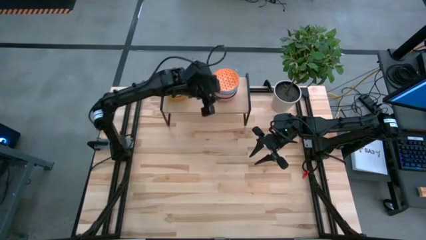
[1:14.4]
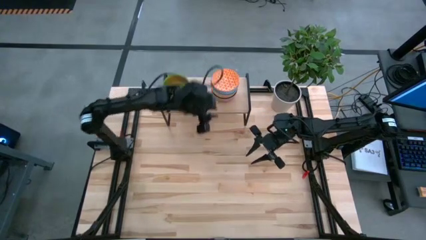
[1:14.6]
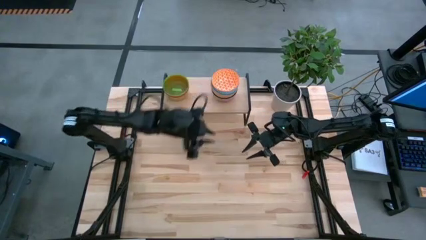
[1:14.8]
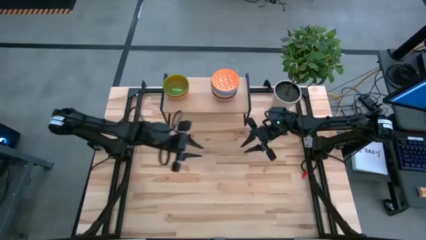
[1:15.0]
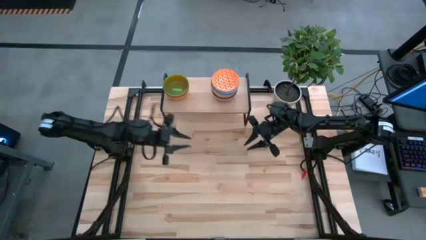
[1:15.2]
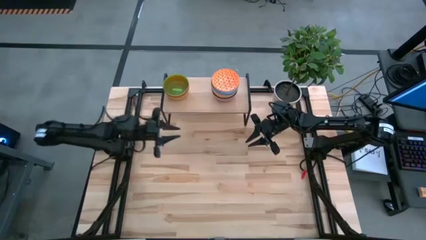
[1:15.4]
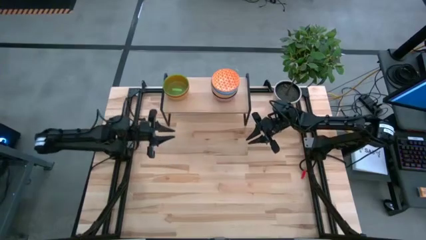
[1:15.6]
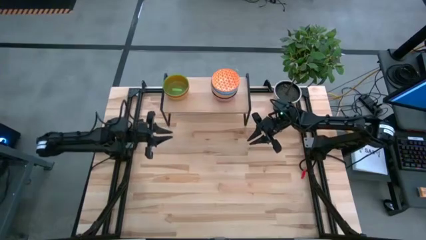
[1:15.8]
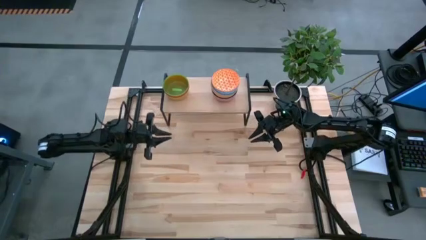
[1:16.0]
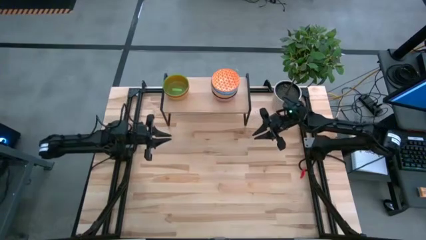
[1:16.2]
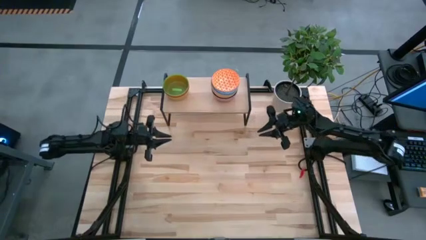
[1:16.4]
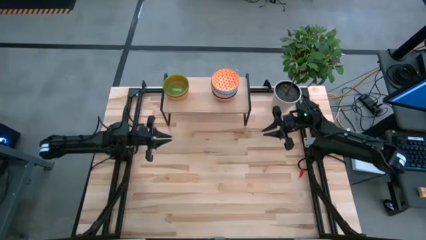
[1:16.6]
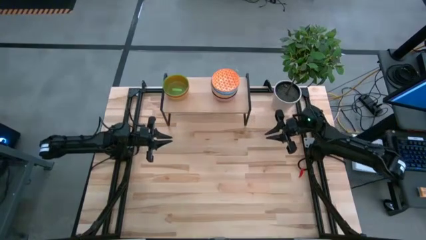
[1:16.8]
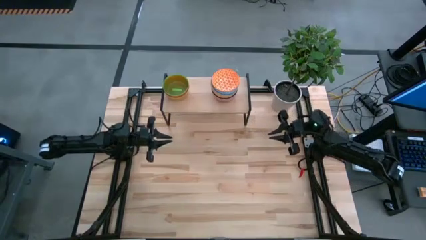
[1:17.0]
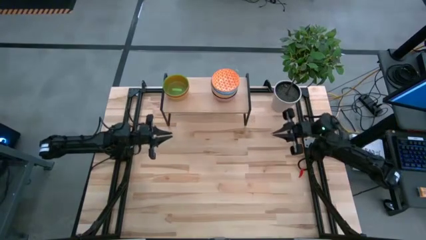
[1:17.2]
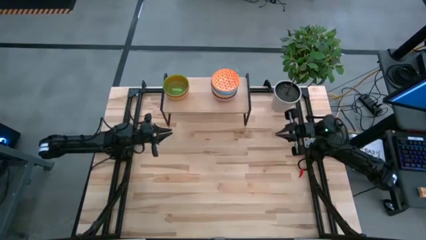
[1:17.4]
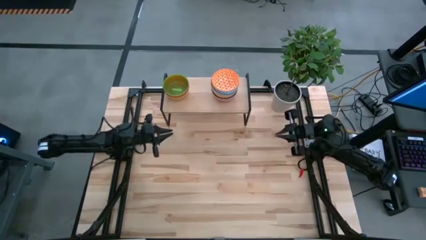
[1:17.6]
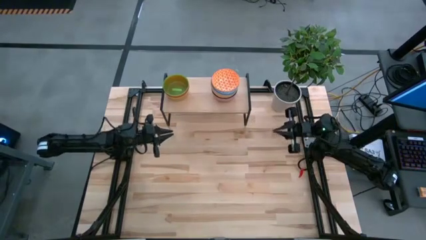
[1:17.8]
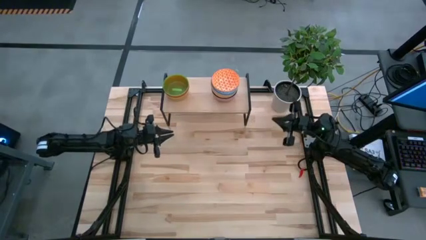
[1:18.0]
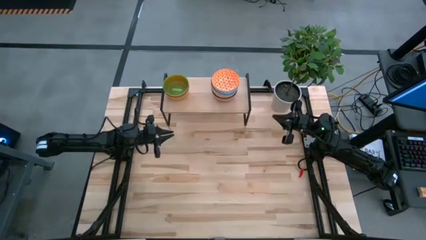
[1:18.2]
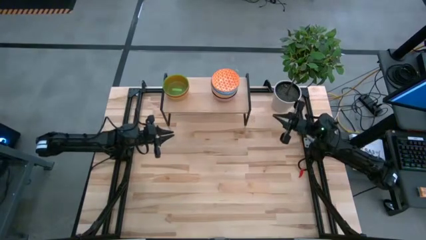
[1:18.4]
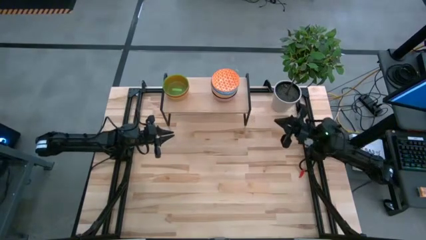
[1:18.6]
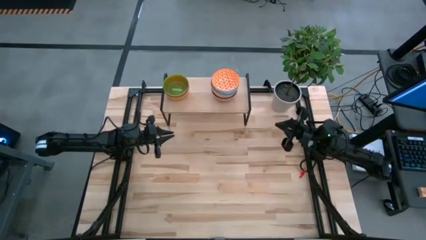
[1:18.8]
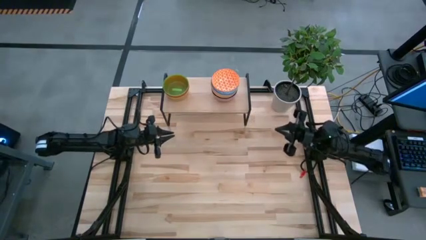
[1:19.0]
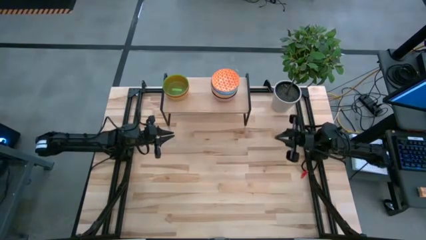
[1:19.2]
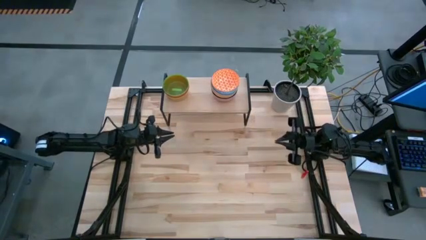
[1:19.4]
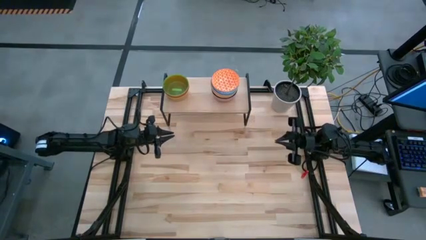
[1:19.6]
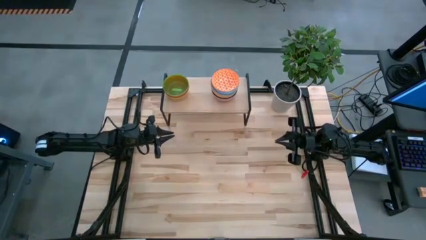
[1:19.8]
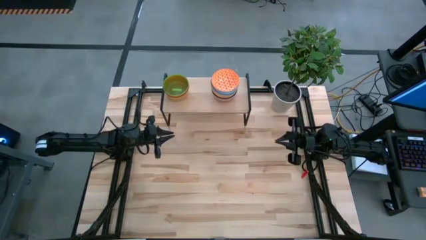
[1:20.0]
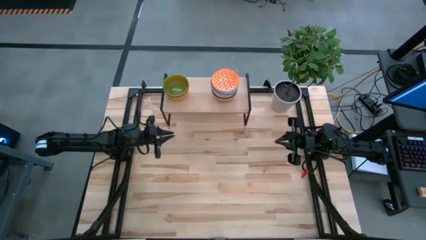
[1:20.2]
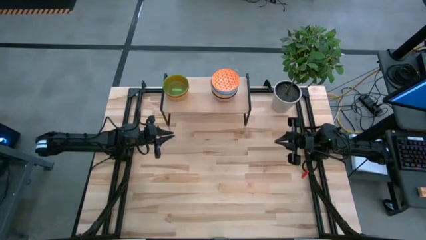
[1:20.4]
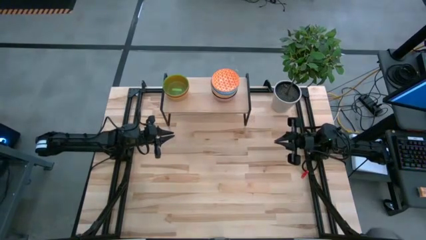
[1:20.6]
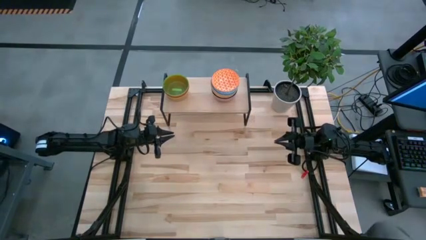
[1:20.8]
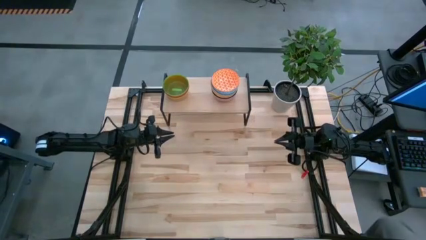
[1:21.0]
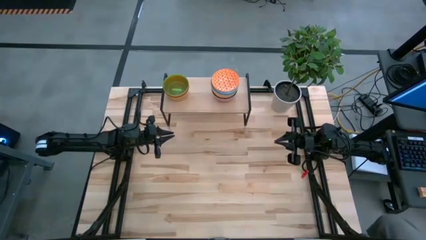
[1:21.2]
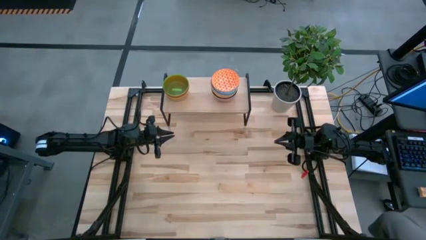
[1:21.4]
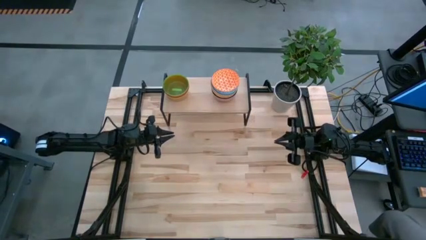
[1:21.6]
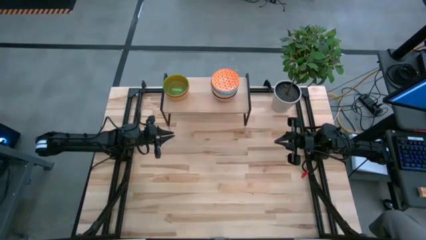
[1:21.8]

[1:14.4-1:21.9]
Task: Place and stack bowls onto a shelf
Return to Home Position

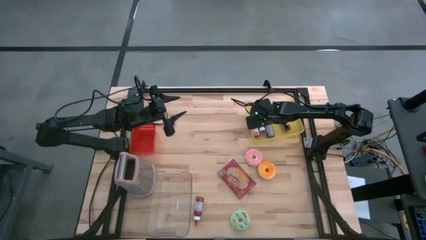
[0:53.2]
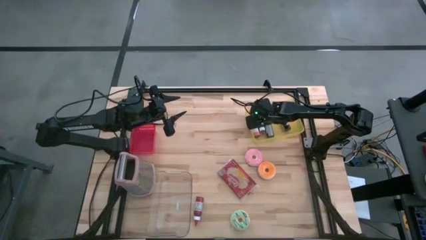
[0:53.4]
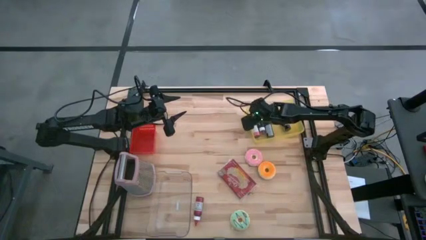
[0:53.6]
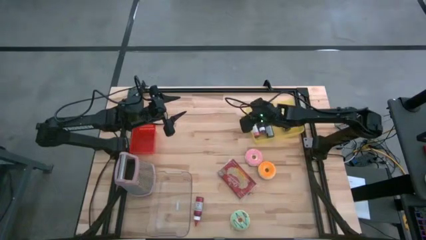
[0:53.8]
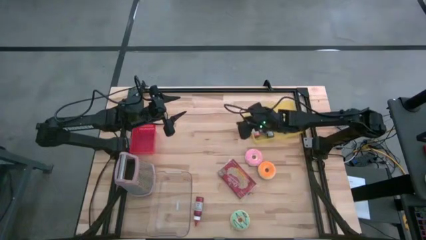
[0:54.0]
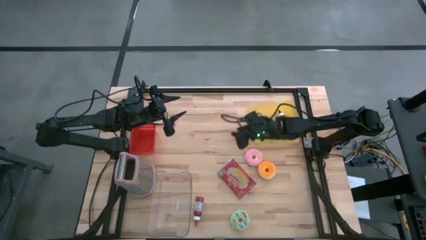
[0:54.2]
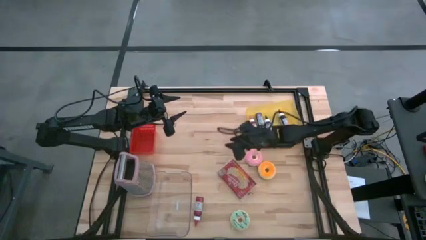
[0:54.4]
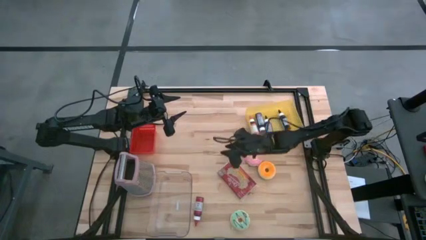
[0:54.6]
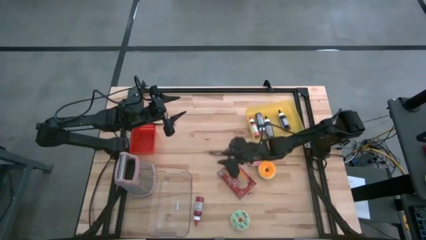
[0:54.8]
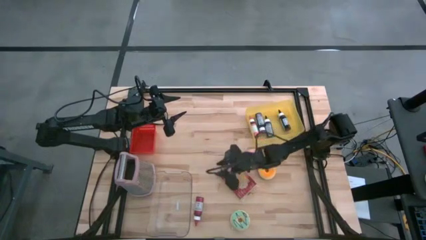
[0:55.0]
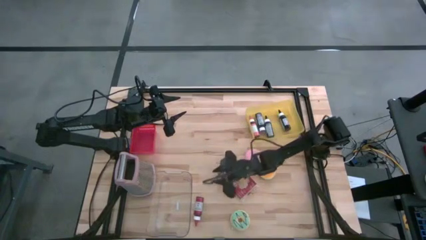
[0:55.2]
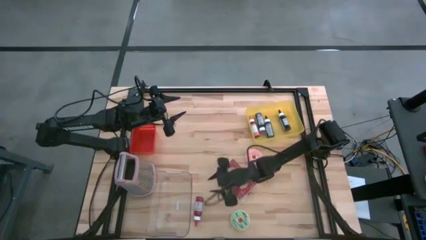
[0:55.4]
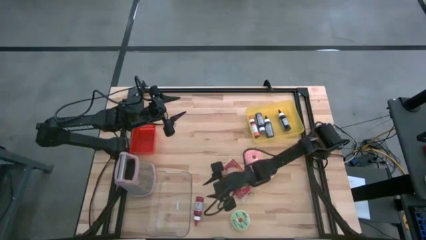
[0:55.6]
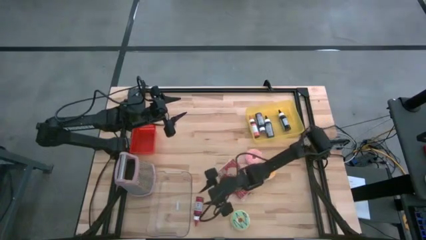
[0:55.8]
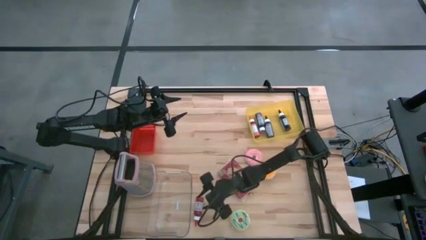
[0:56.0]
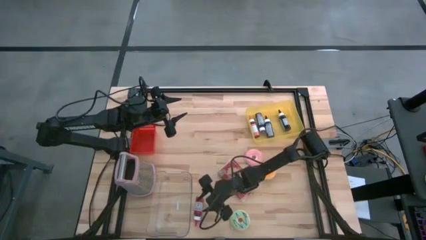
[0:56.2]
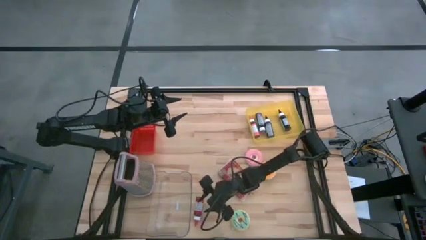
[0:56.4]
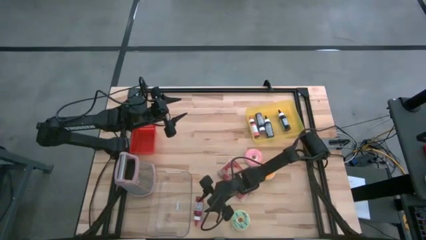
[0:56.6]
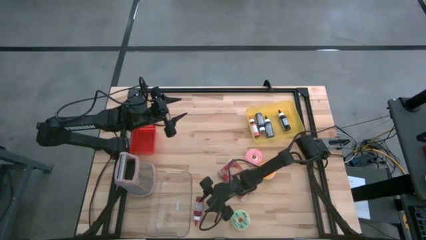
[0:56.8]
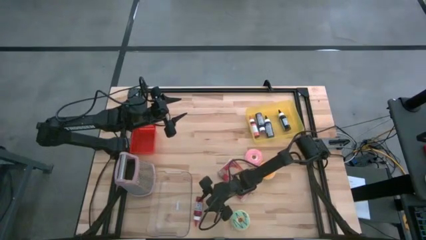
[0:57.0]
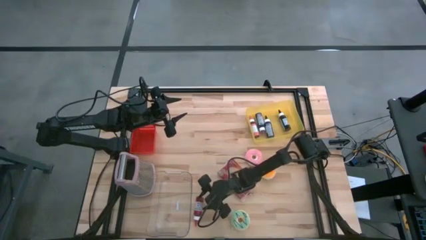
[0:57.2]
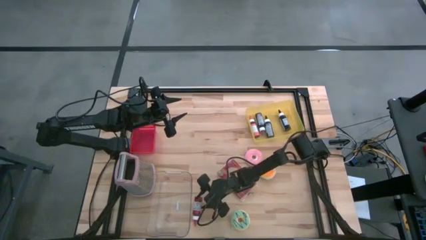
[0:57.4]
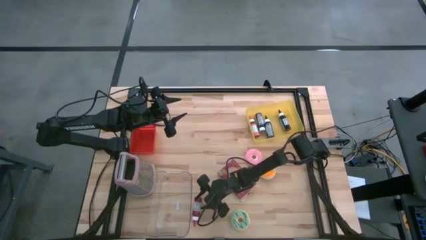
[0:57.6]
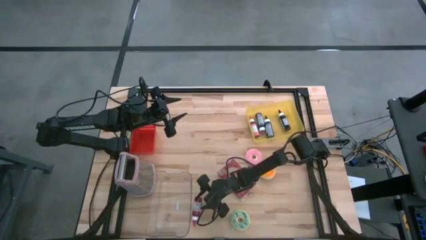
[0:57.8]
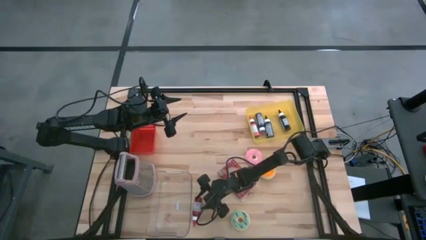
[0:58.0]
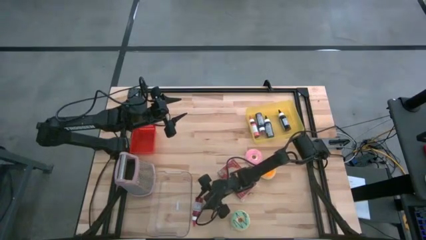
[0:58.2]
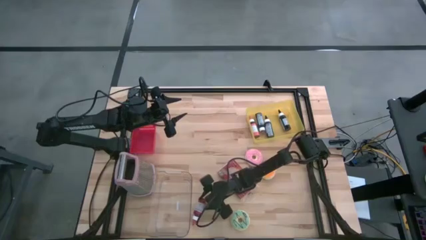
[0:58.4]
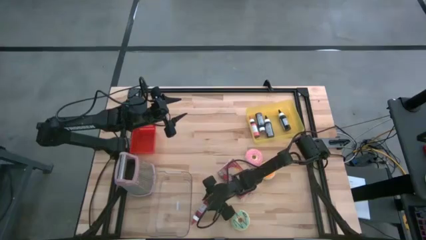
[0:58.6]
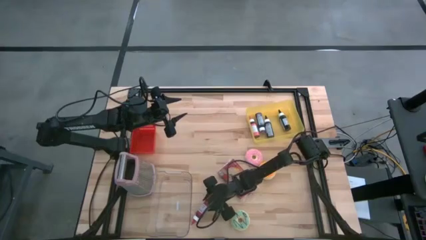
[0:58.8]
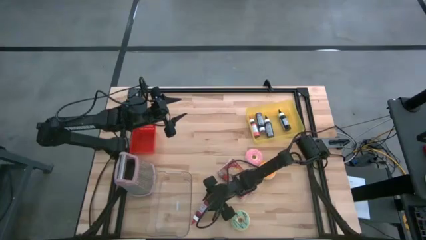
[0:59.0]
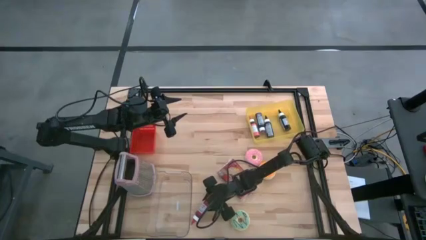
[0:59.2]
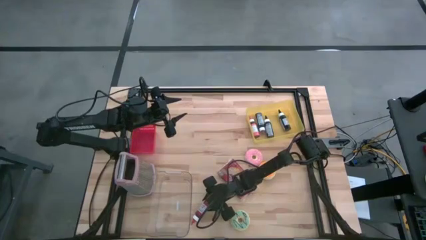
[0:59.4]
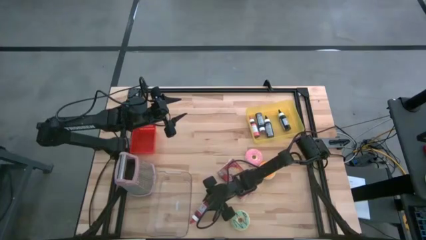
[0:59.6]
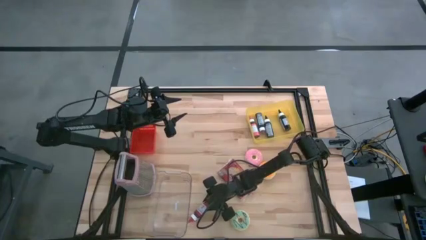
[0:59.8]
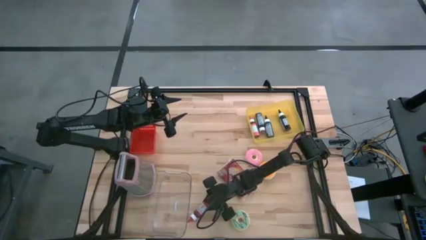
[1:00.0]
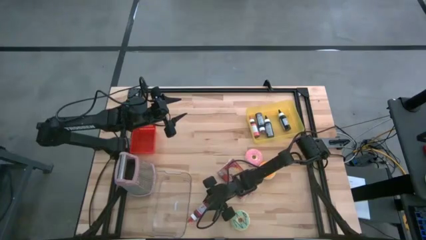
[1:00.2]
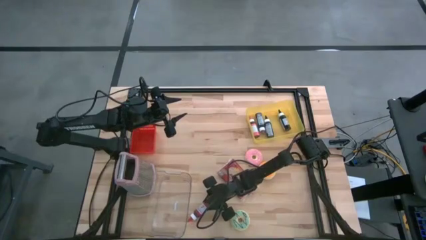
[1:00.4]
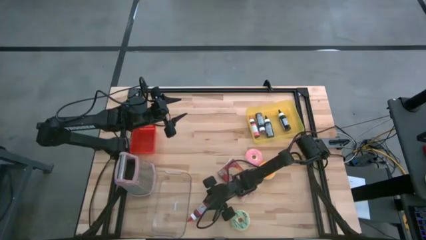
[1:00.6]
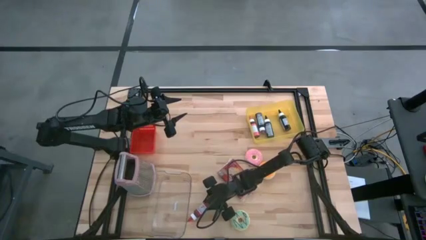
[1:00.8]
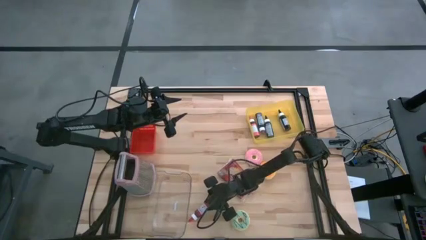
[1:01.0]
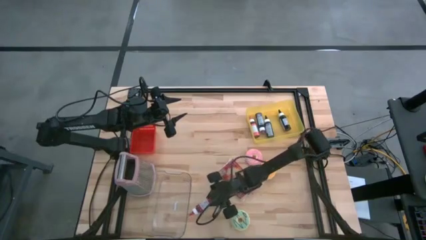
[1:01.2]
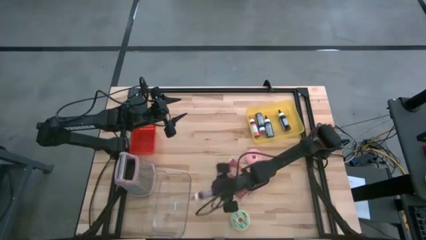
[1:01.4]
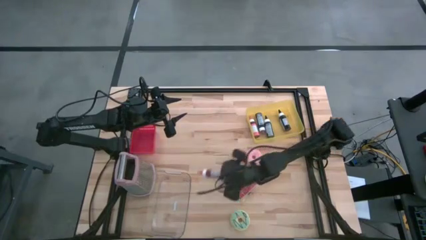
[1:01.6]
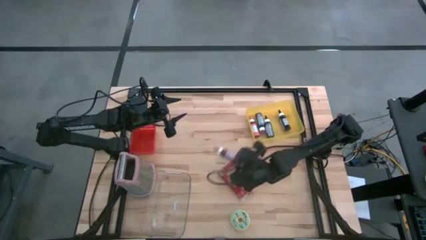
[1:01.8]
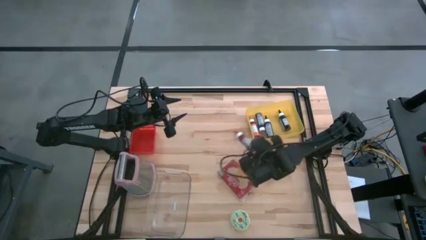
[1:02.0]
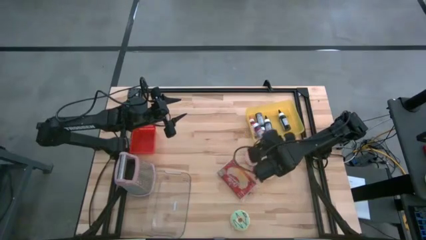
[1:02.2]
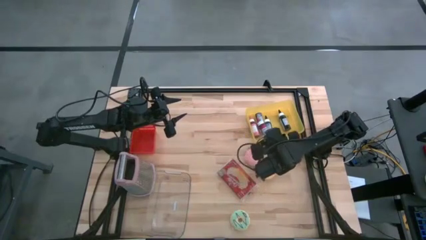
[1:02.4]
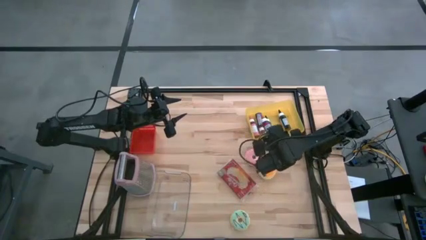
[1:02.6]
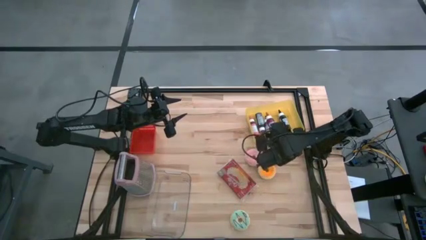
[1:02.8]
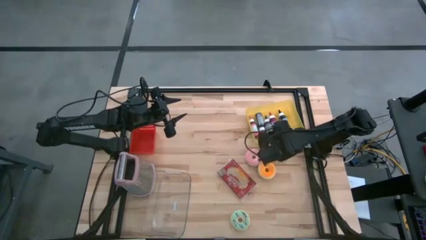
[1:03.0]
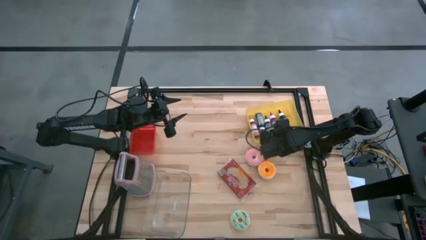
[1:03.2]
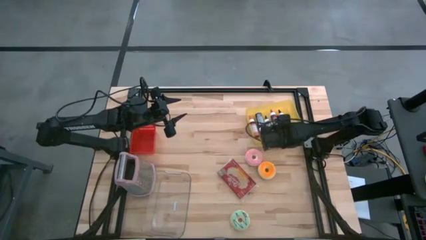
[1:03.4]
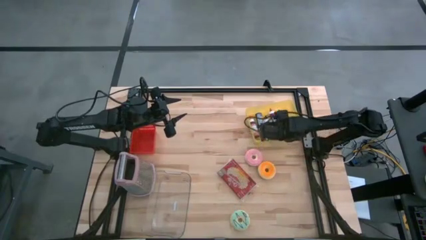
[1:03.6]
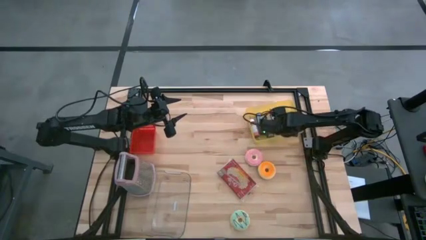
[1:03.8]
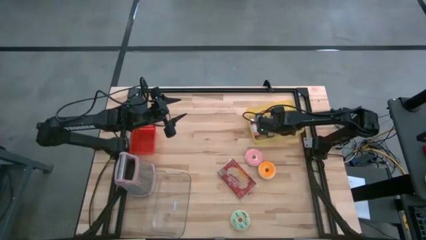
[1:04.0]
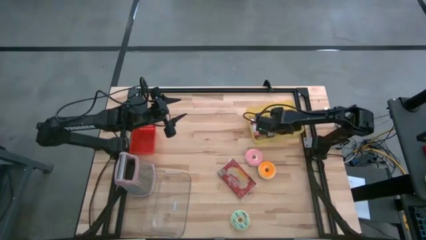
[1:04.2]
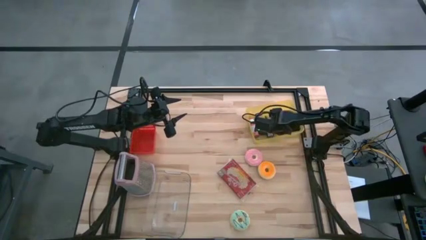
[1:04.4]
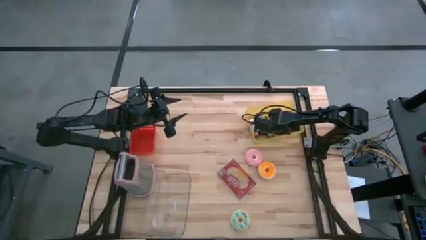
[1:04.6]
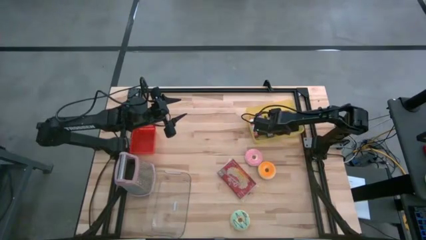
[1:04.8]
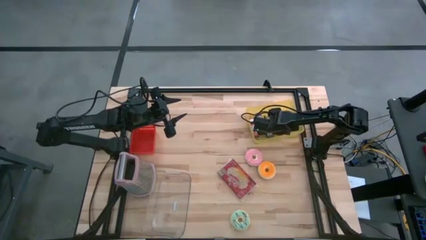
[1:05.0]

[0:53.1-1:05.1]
Task: Pick & Place Food Item
Put the red food coloring bottle into the yellow bin
